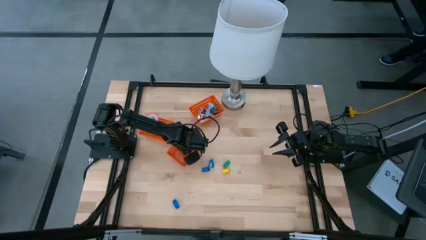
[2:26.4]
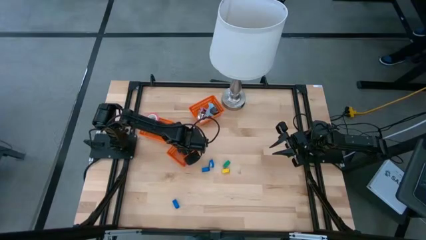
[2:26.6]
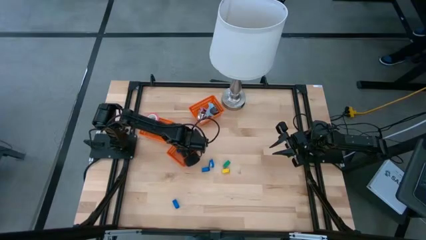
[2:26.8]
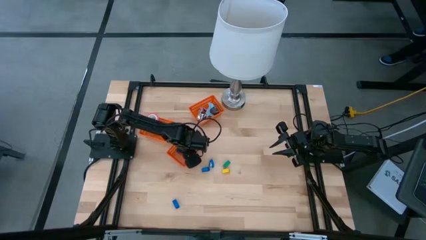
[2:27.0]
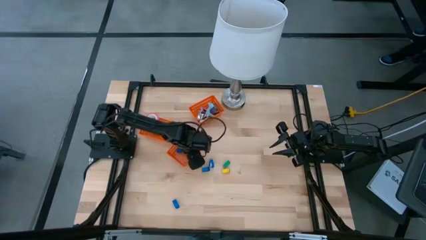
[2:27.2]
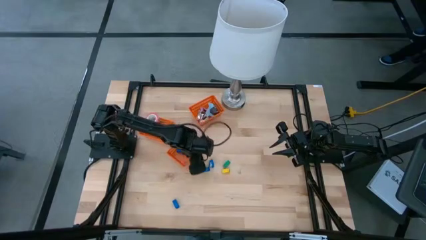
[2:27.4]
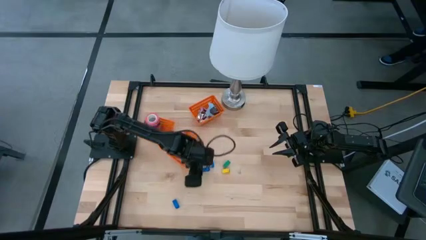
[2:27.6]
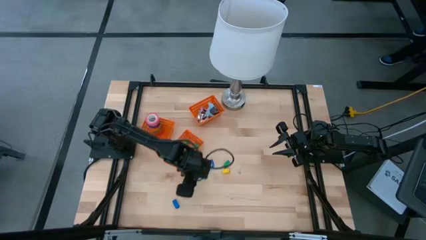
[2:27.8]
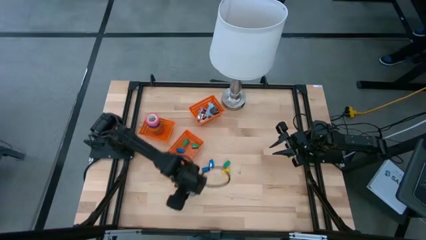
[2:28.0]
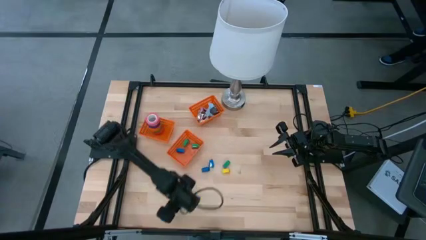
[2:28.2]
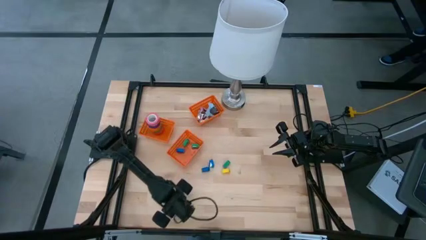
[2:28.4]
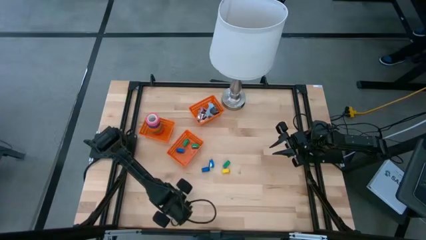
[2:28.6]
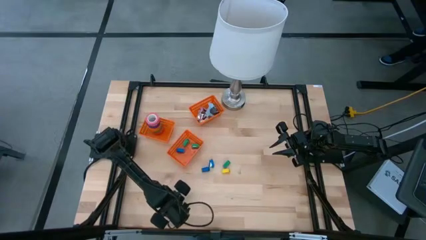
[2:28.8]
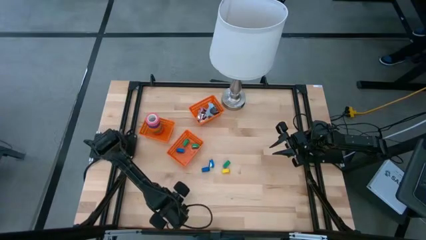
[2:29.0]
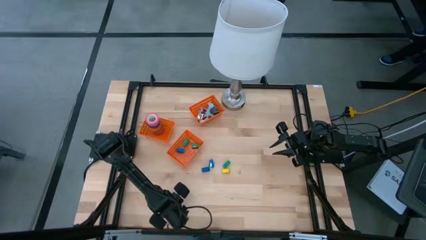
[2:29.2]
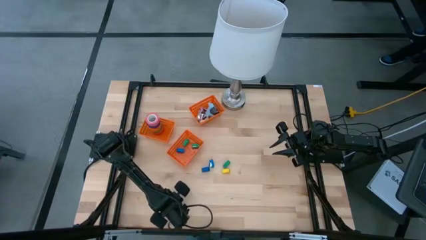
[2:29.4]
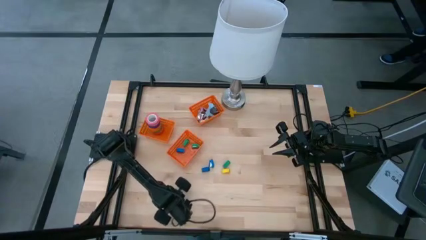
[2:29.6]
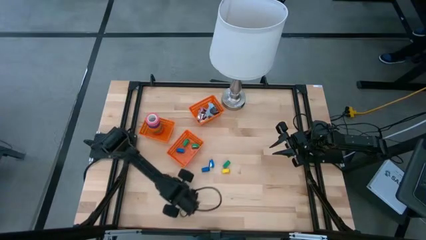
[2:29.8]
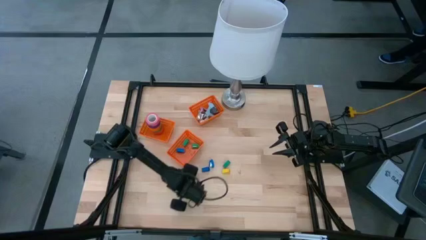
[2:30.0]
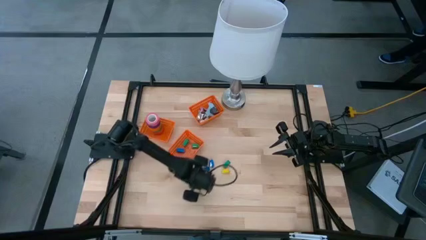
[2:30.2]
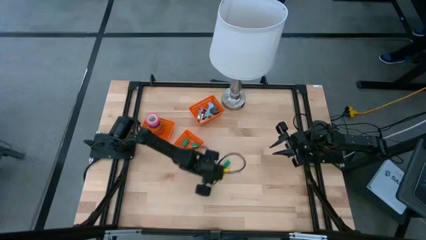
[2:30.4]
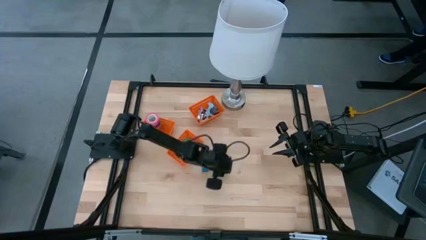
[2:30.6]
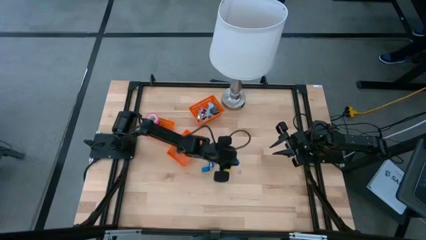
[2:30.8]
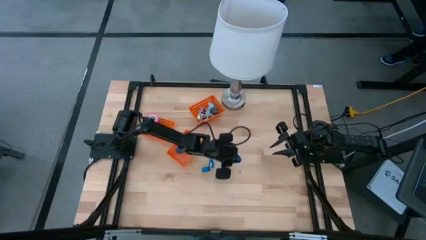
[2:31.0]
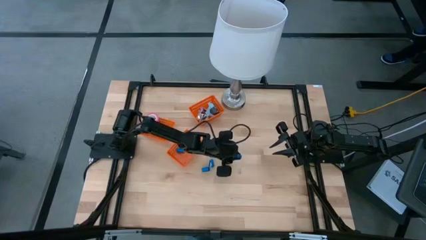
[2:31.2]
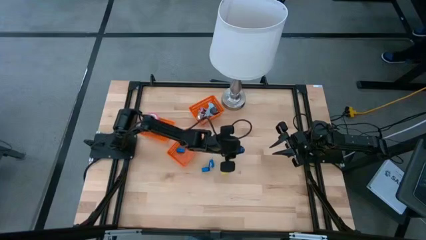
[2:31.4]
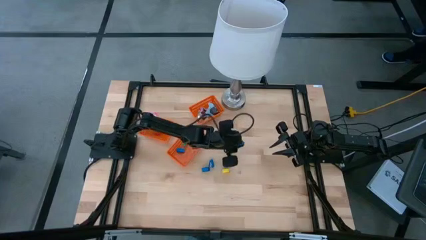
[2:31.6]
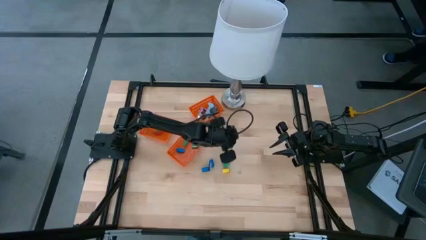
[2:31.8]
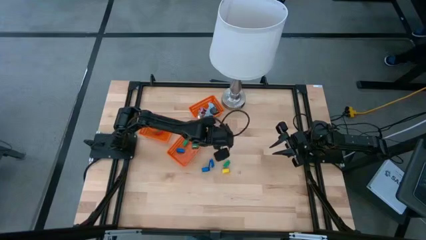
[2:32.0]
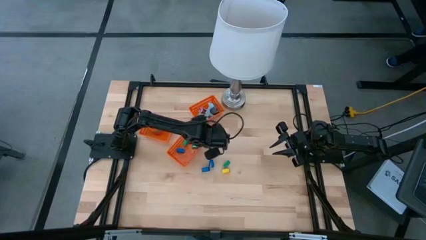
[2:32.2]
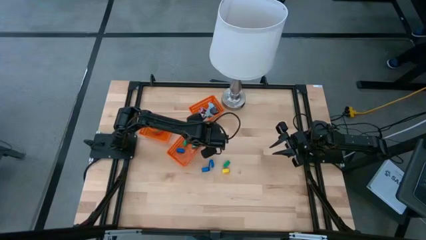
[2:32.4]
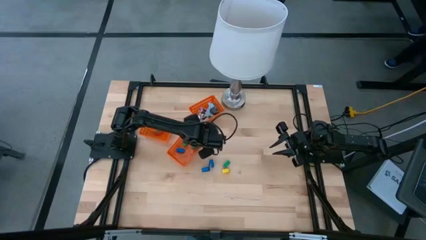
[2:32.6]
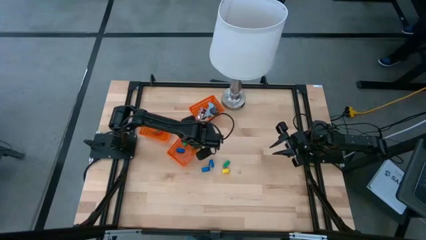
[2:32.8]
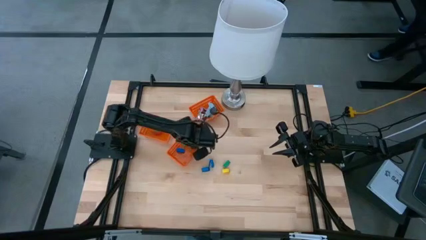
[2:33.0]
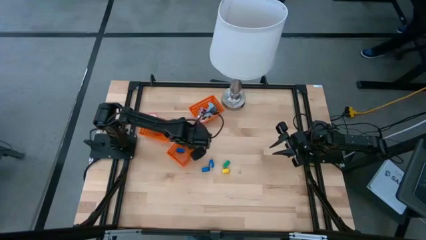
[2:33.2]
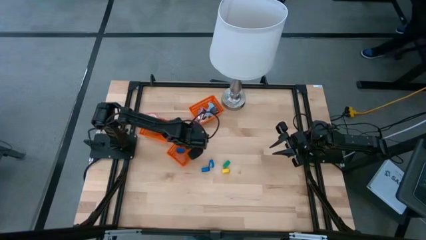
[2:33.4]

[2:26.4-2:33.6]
Task: Pick and place Stapler, Stapler remover, tape
Put the blue stapler into the bottom orange bin

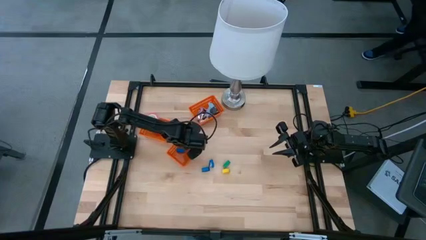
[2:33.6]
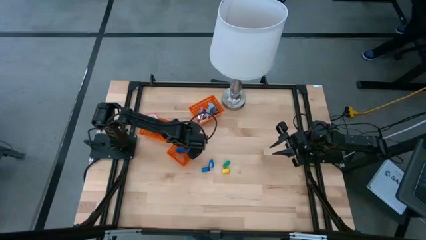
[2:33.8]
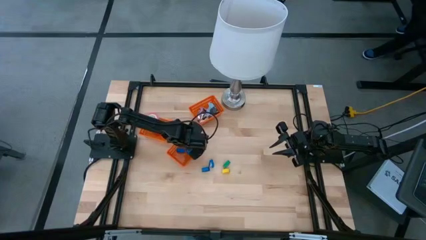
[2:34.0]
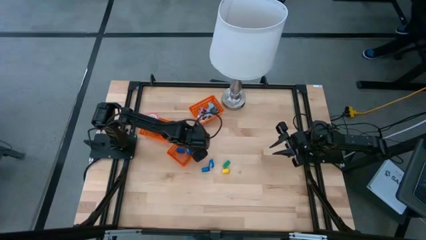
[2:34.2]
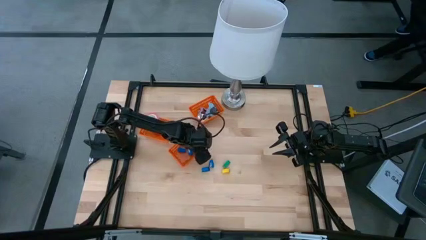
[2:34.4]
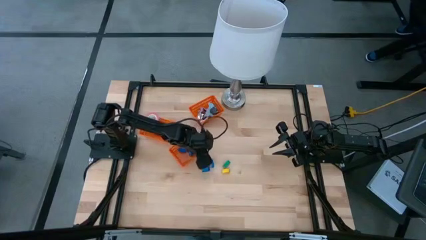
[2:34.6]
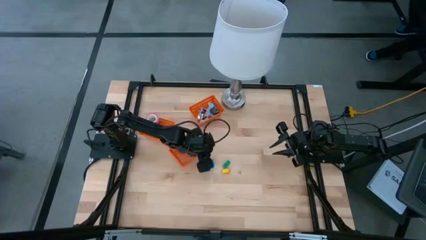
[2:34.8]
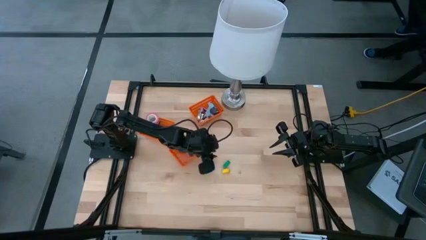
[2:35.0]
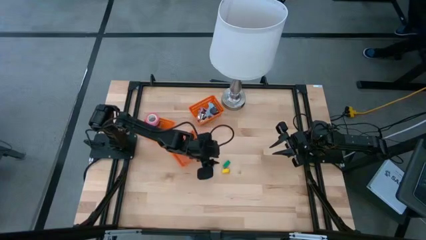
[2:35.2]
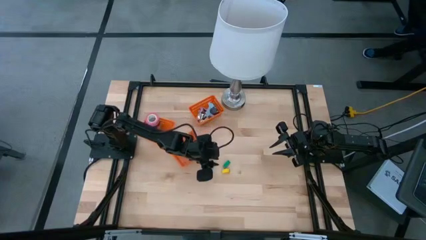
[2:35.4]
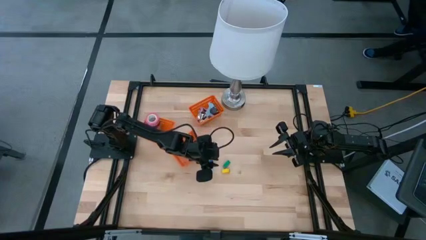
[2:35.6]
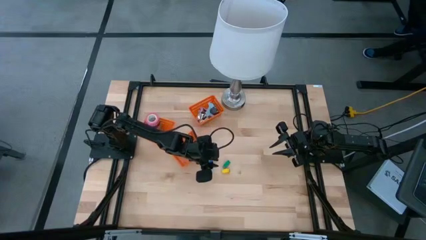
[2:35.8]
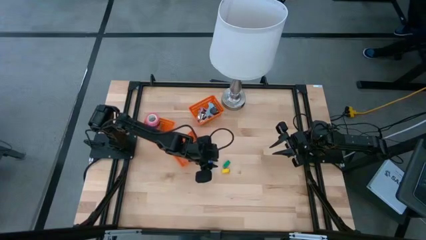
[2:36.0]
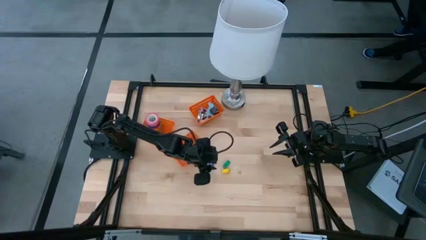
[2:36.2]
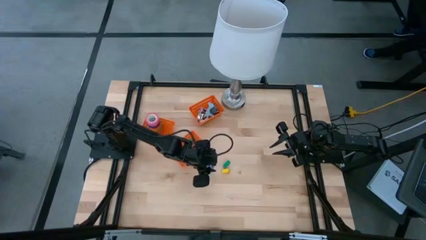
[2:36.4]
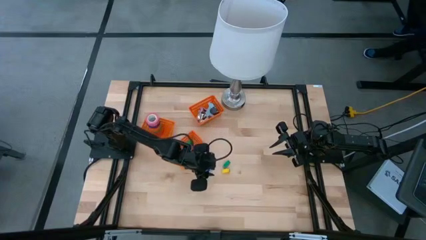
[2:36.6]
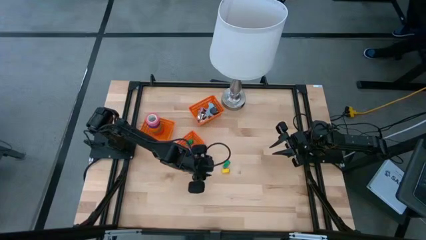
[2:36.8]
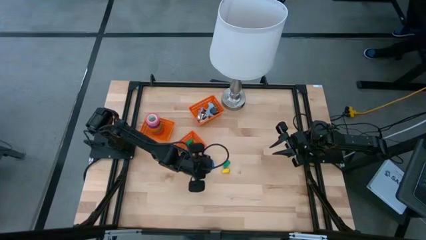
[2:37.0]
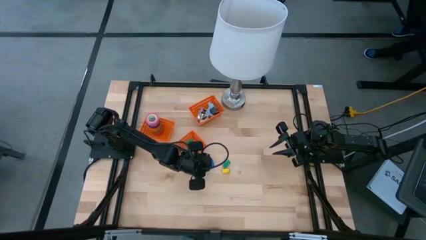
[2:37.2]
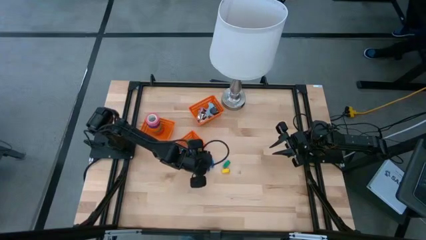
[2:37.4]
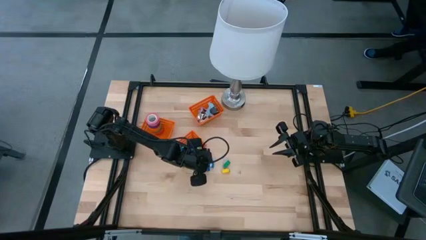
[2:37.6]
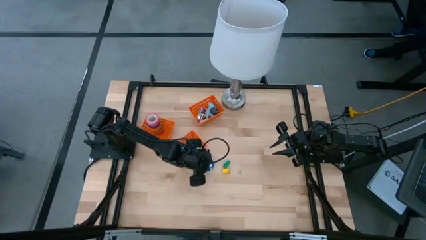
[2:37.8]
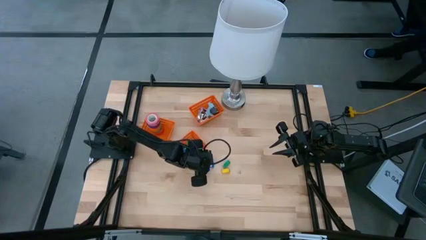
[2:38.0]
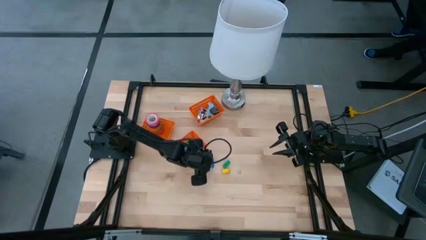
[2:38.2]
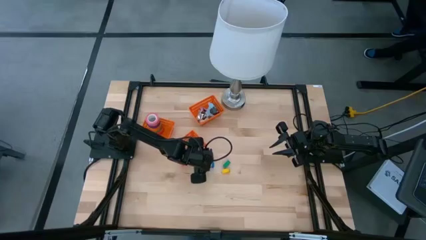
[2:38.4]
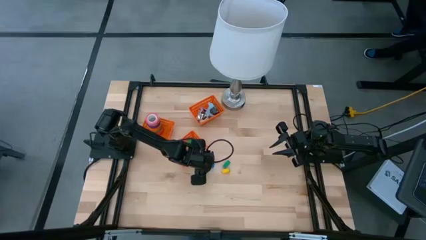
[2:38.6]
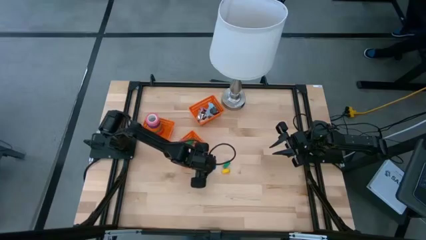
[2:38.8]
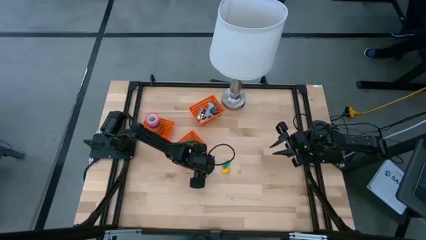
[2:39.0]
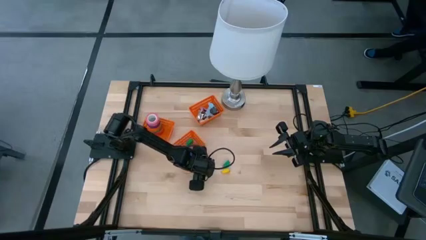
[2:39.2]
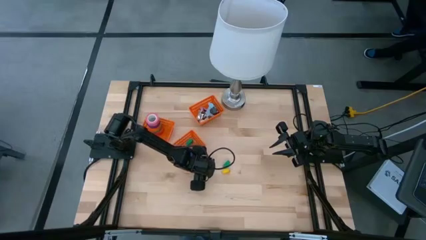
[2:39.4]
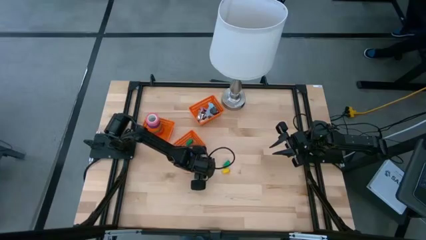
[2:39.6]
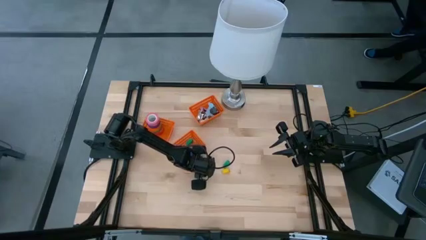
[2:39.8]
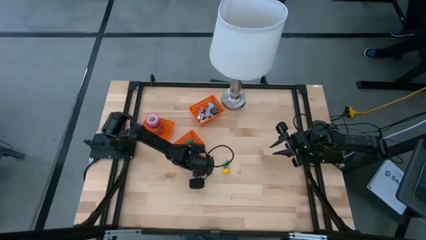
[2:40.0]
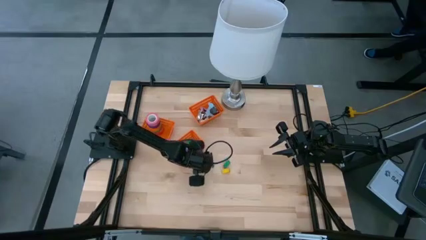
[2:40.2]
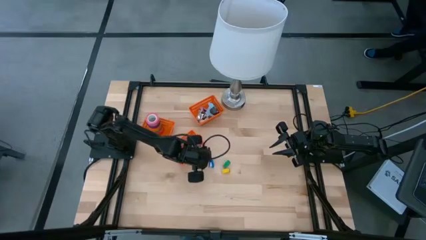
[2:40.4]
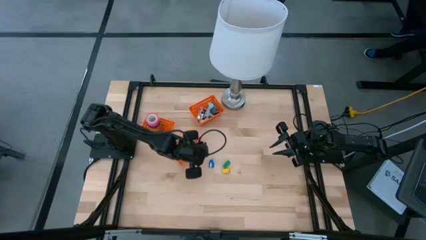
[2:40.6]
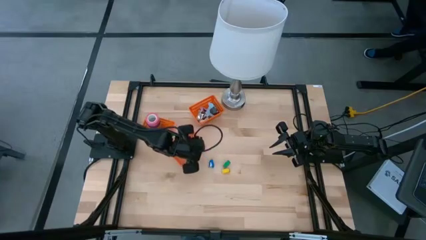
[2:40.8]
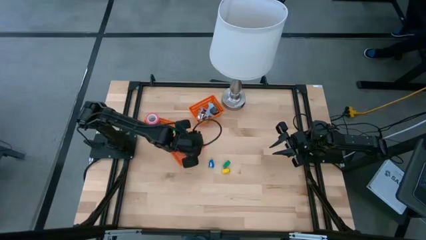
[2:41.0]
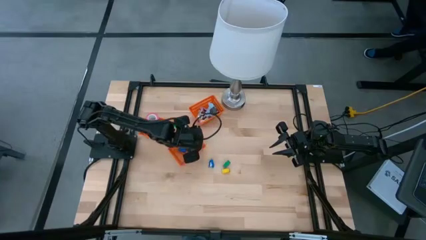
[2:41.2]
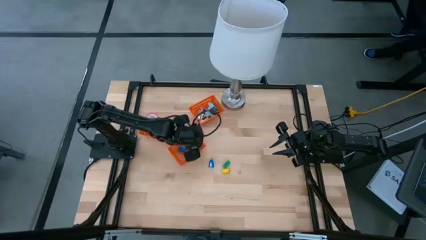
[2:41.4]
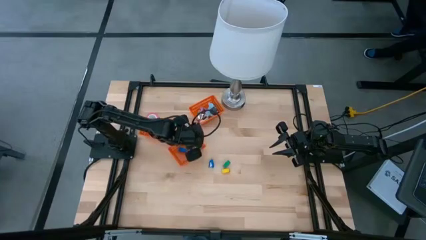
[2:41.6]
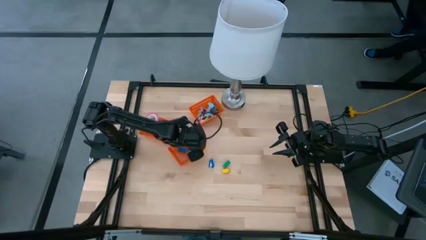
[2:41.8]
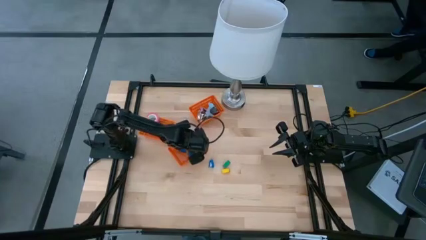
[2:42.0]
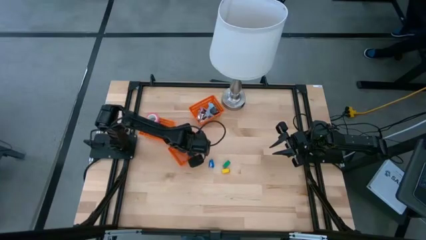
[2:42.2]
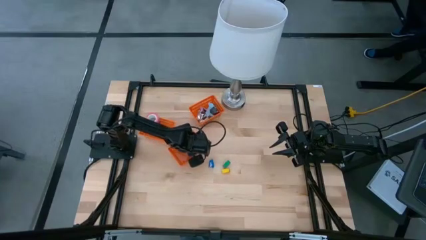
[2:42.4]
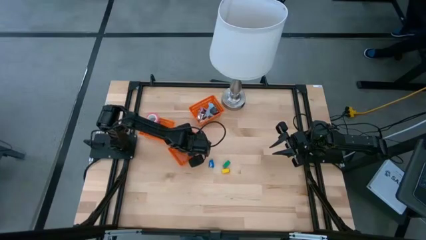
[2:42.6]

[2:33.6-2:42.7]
Put the blue stapler into the bottom orange bin

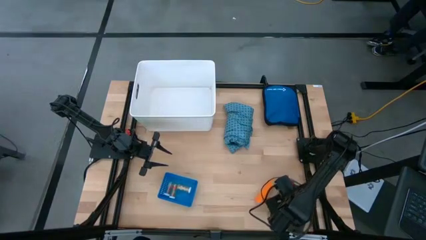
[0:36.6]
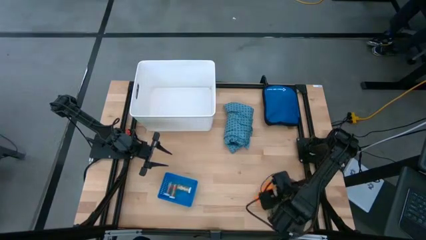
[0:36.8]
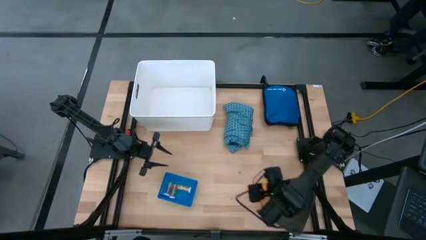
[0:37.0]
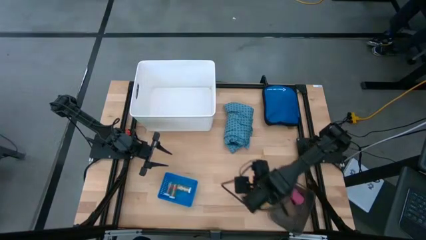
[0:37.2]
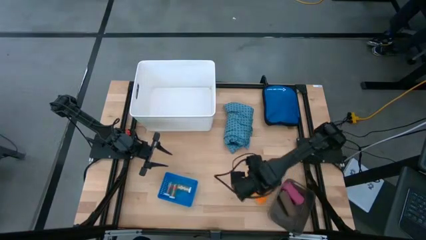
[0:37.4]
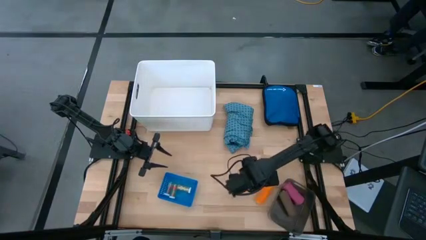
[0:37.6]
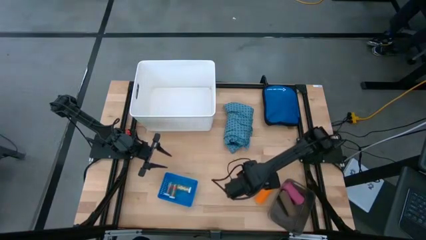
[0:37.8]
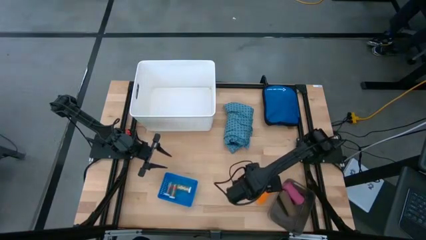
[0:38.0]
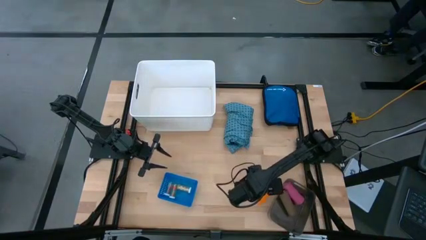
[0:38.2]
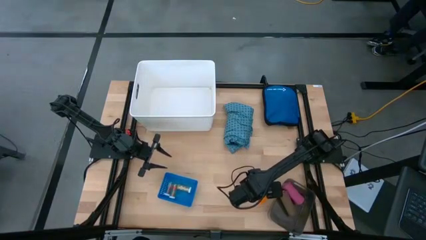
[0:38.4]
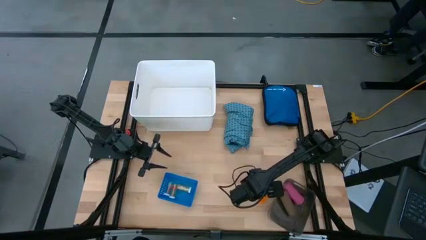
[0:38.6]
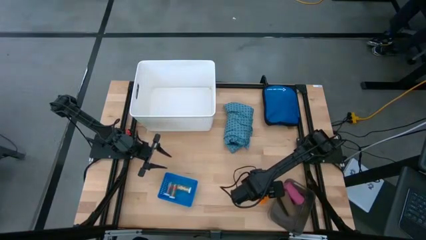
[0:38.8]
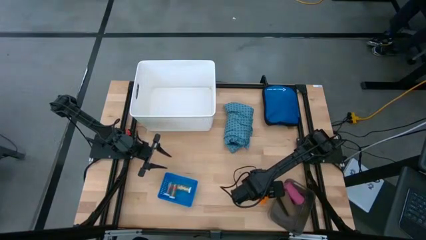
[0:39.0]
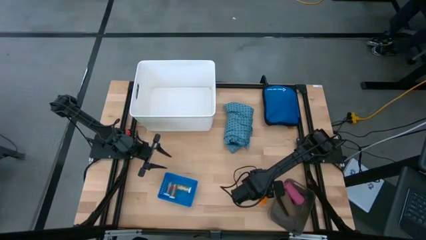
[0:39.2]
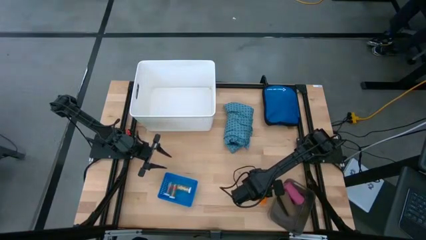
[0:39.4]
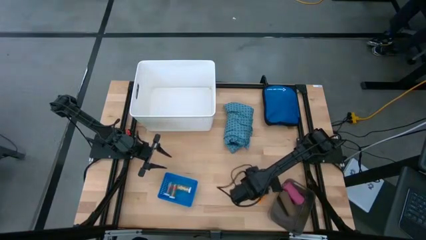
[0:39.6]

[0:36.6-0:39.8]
Task: Pick & Place Medicine items
Put the orange bandage into the black bin
